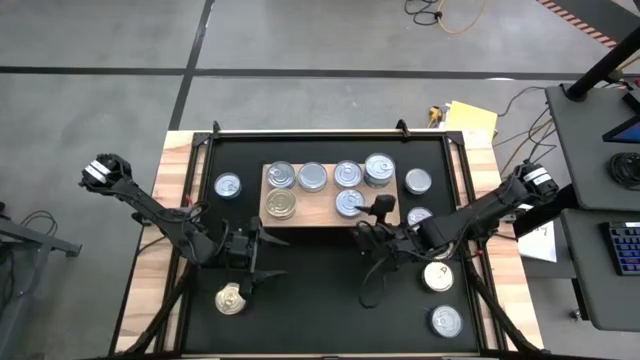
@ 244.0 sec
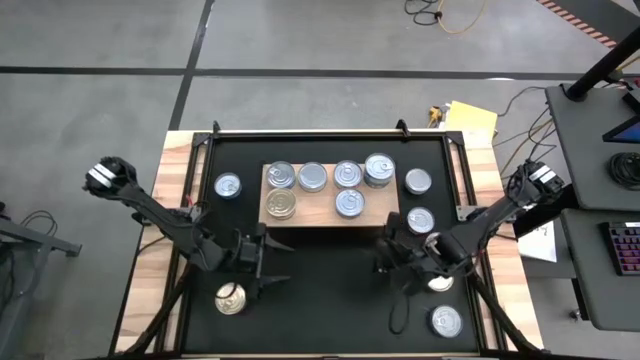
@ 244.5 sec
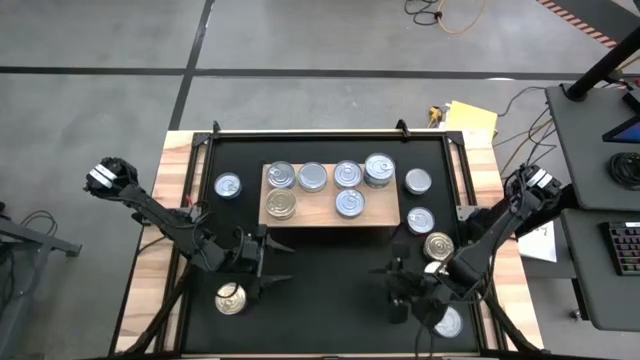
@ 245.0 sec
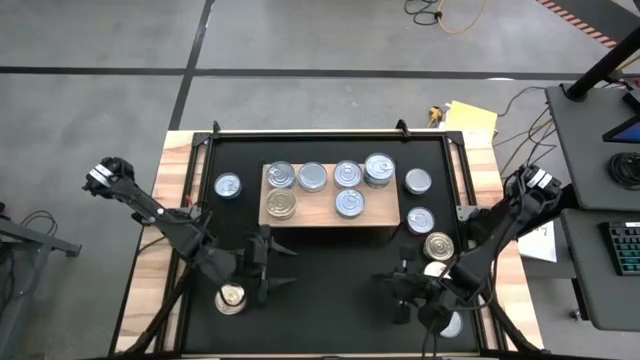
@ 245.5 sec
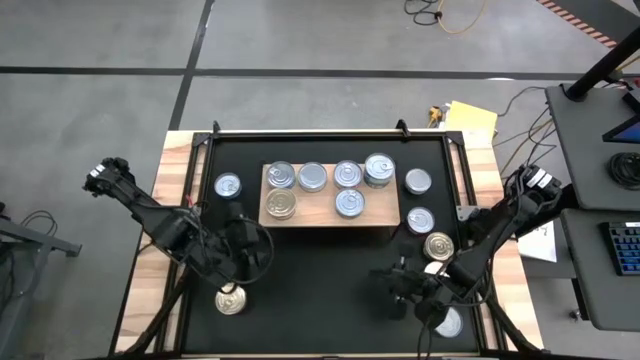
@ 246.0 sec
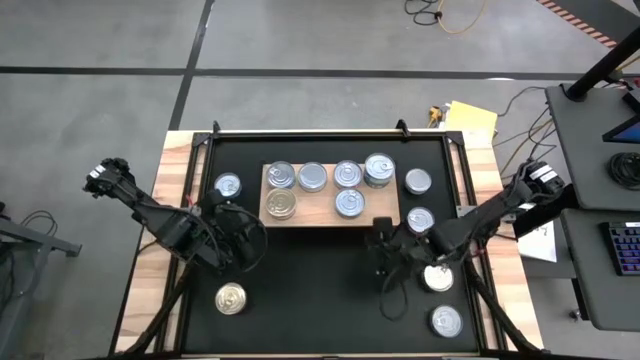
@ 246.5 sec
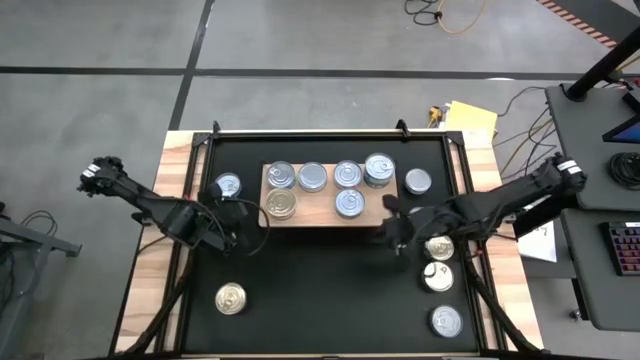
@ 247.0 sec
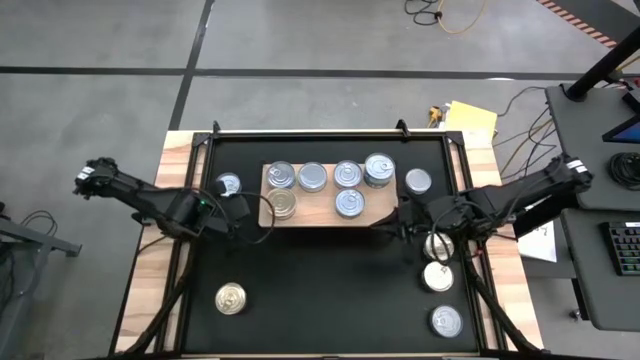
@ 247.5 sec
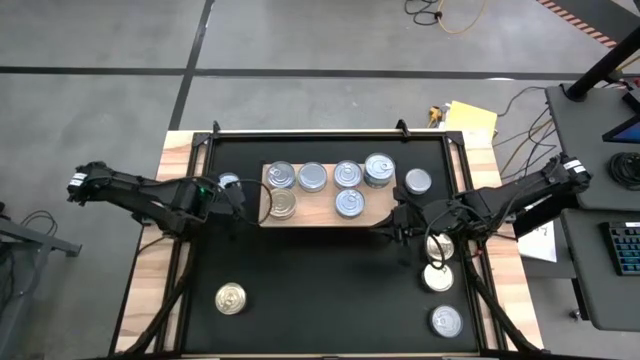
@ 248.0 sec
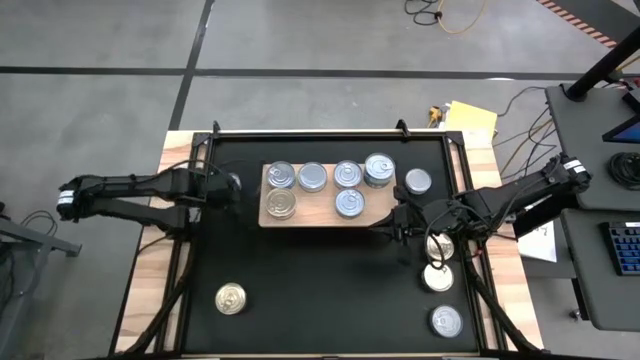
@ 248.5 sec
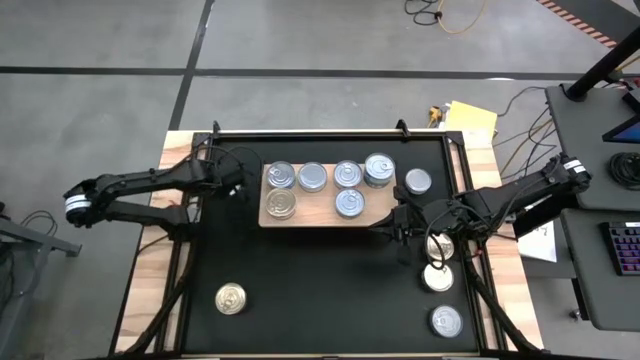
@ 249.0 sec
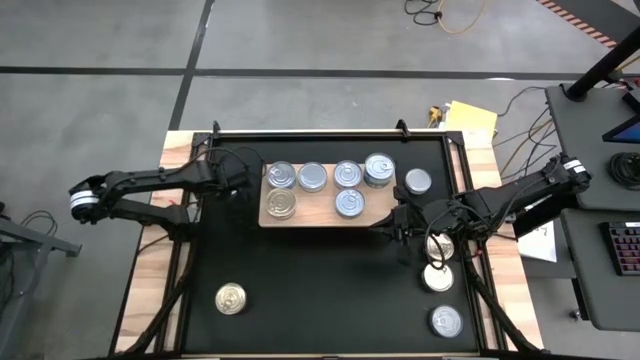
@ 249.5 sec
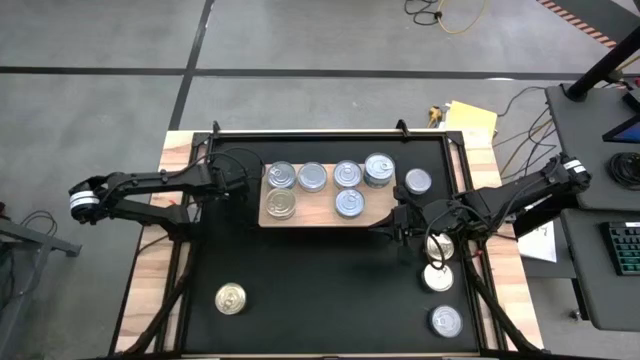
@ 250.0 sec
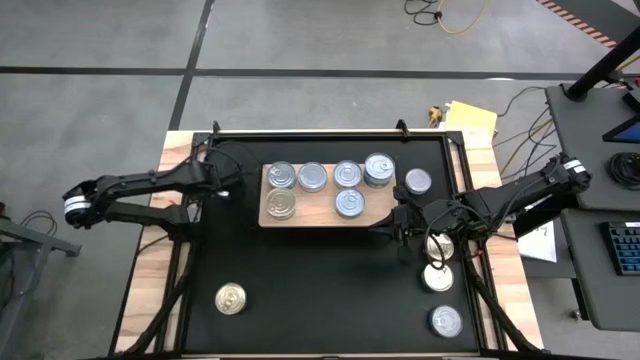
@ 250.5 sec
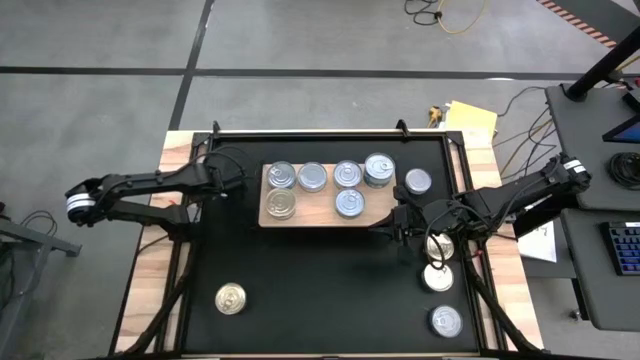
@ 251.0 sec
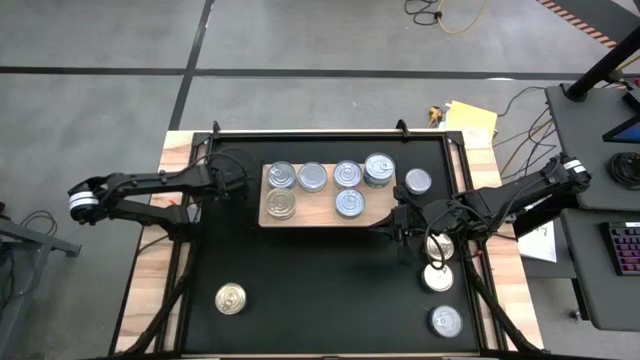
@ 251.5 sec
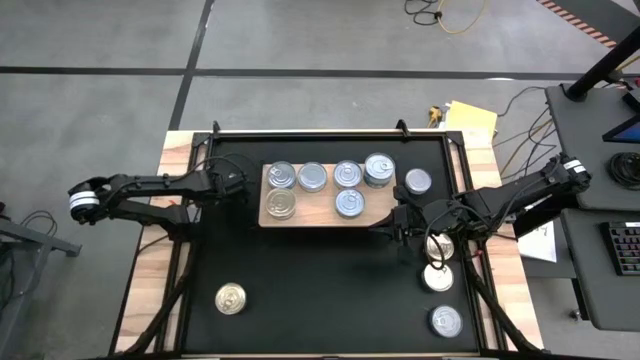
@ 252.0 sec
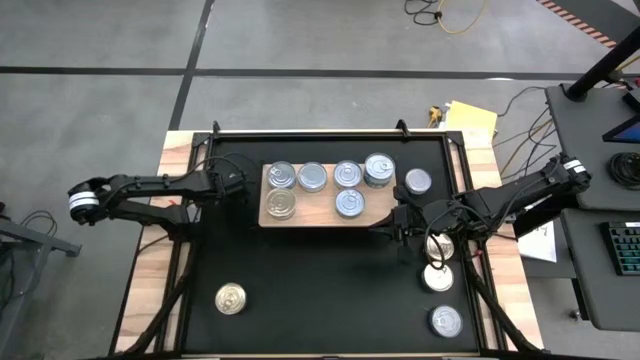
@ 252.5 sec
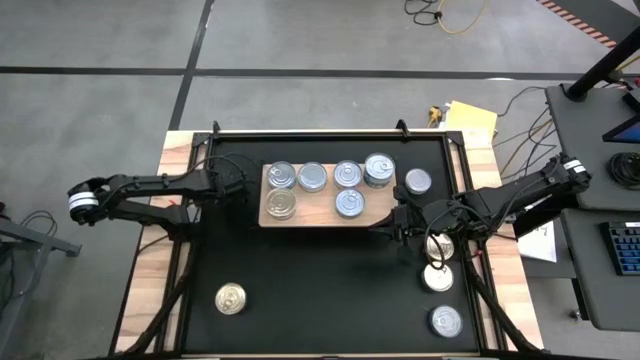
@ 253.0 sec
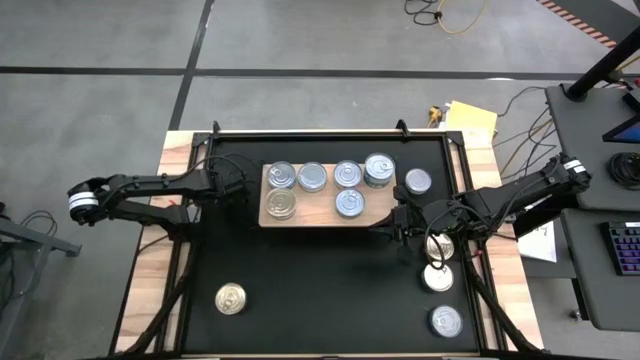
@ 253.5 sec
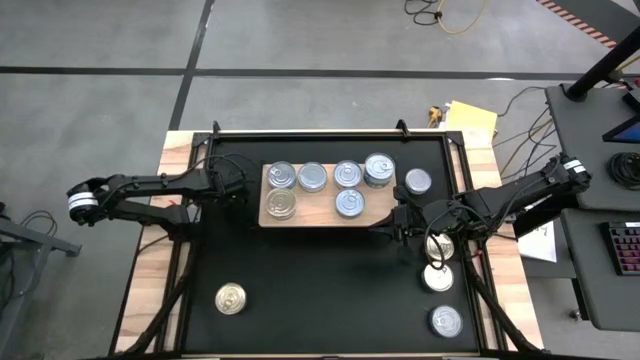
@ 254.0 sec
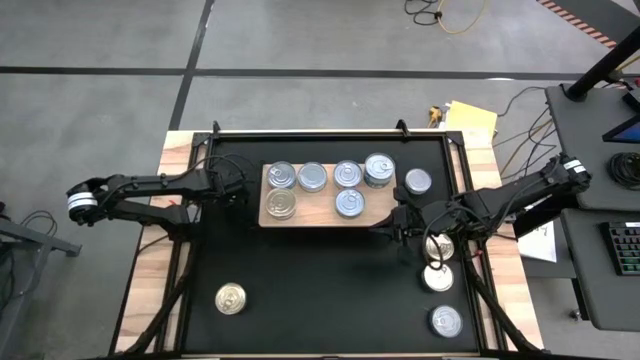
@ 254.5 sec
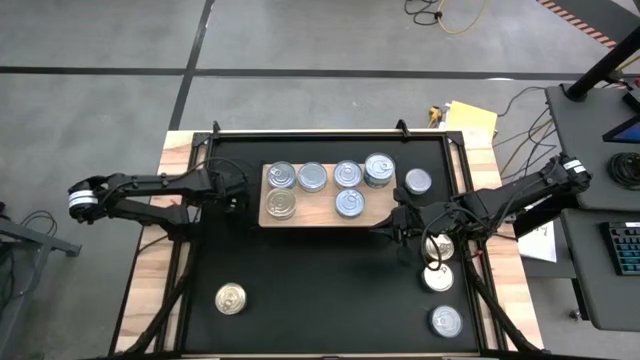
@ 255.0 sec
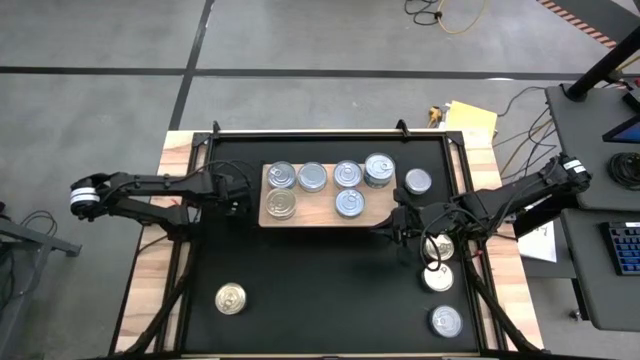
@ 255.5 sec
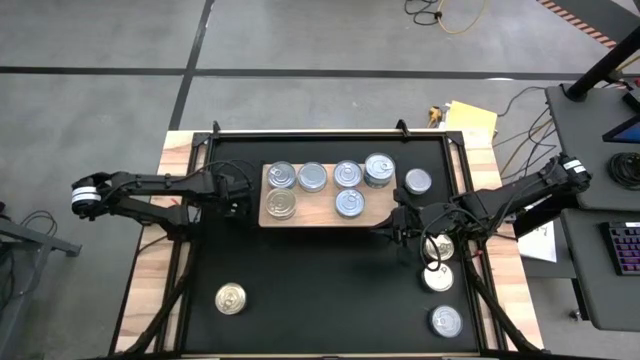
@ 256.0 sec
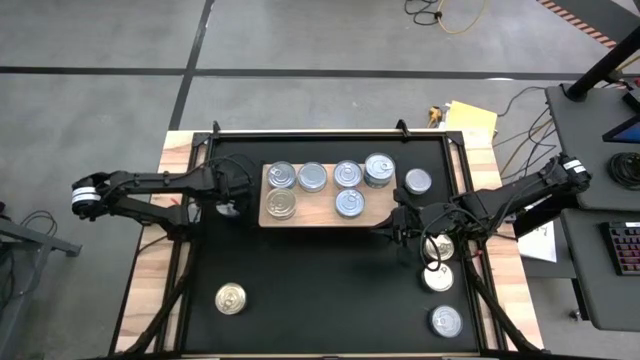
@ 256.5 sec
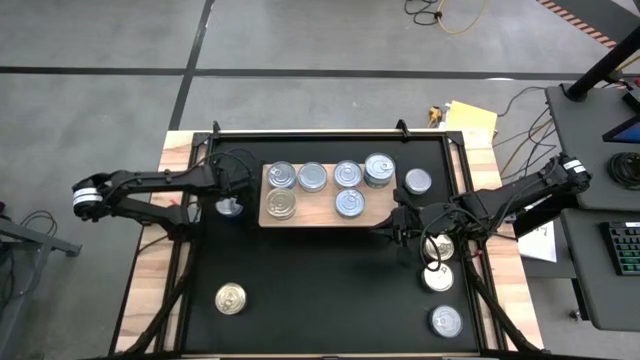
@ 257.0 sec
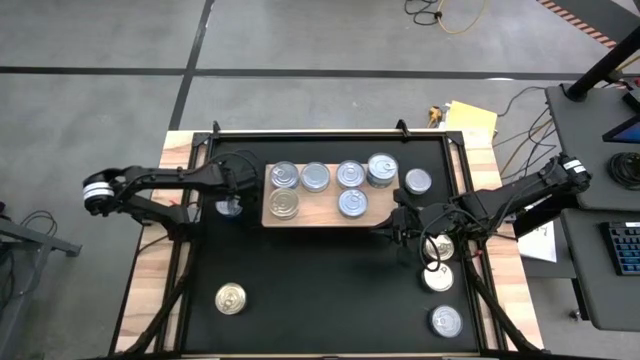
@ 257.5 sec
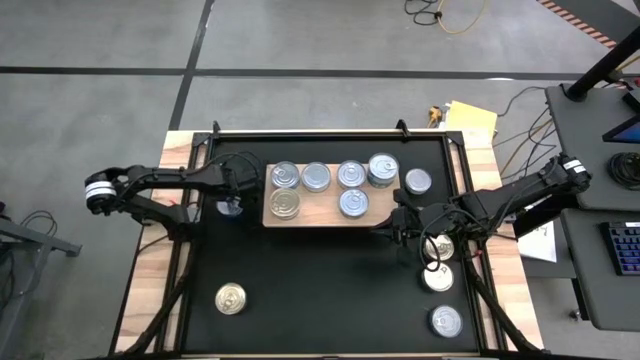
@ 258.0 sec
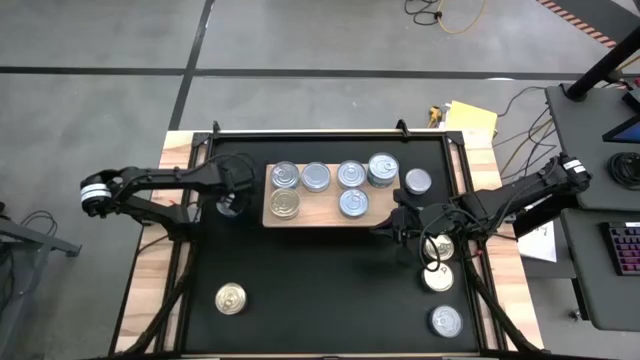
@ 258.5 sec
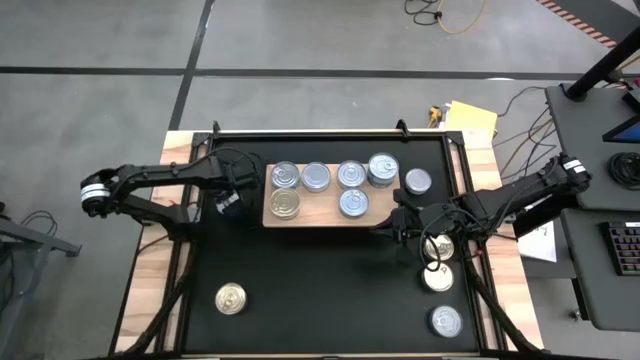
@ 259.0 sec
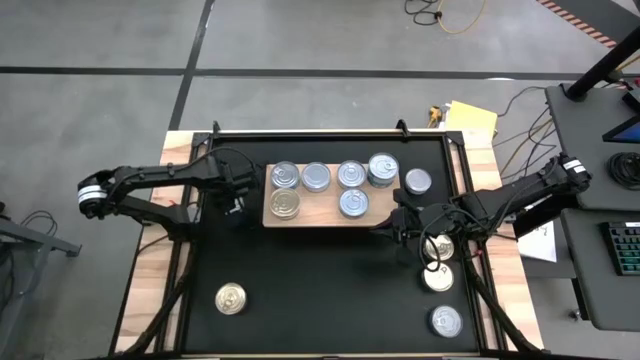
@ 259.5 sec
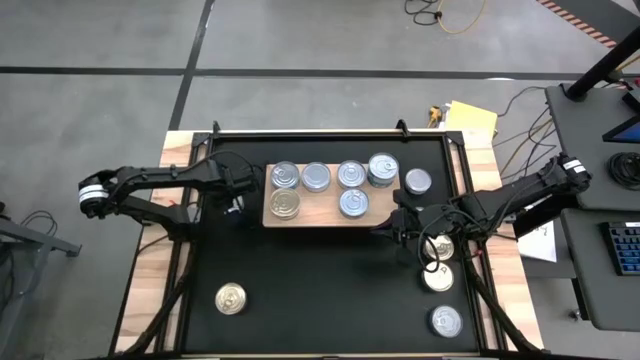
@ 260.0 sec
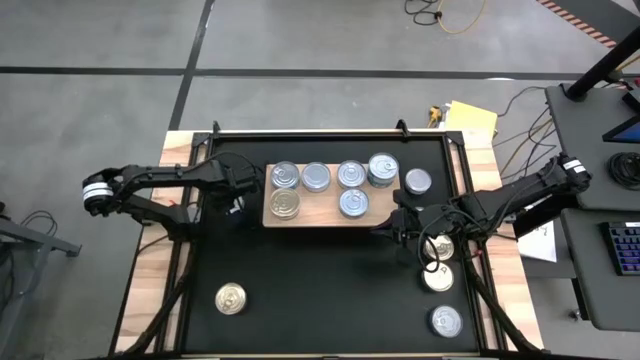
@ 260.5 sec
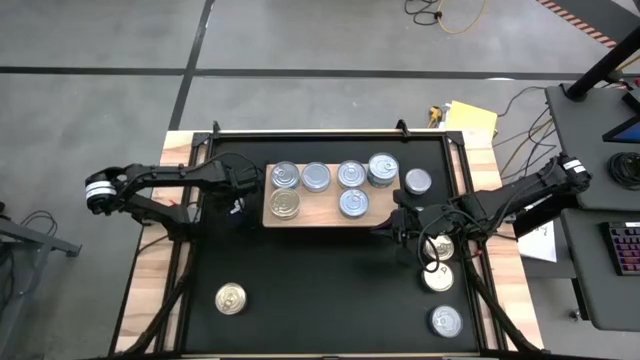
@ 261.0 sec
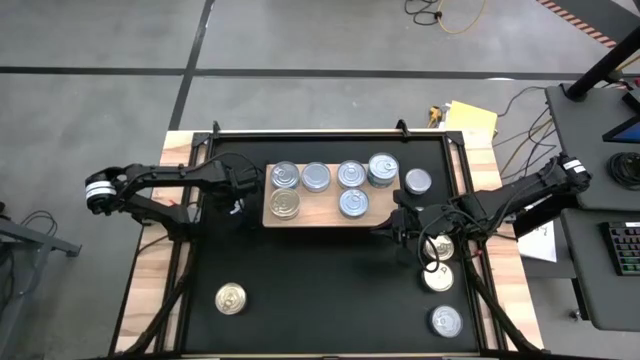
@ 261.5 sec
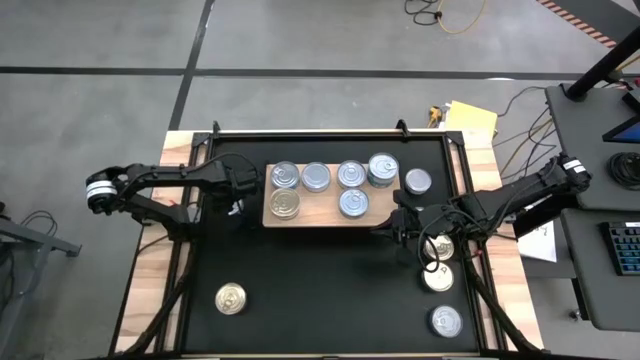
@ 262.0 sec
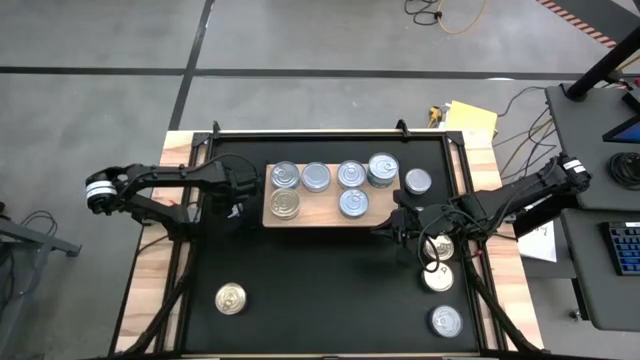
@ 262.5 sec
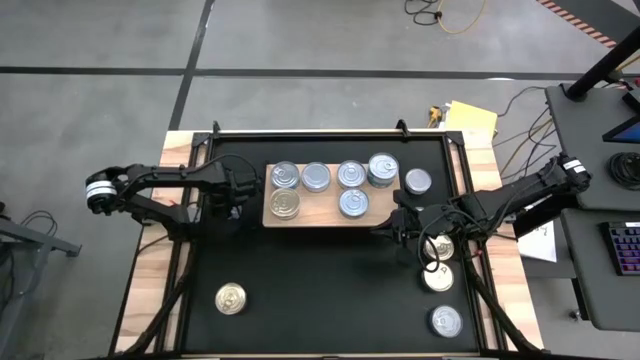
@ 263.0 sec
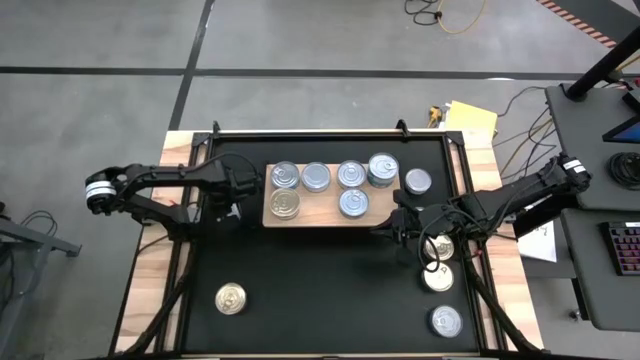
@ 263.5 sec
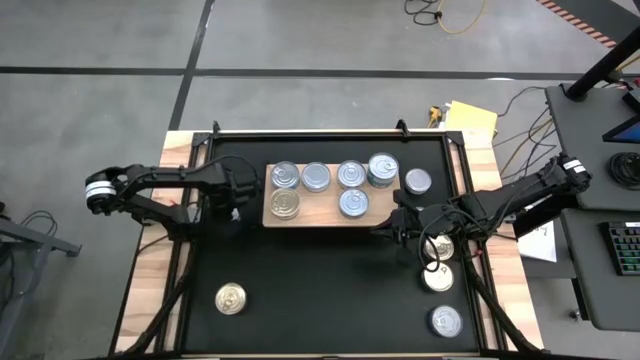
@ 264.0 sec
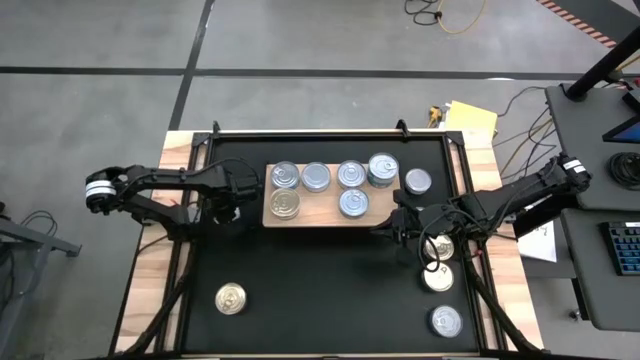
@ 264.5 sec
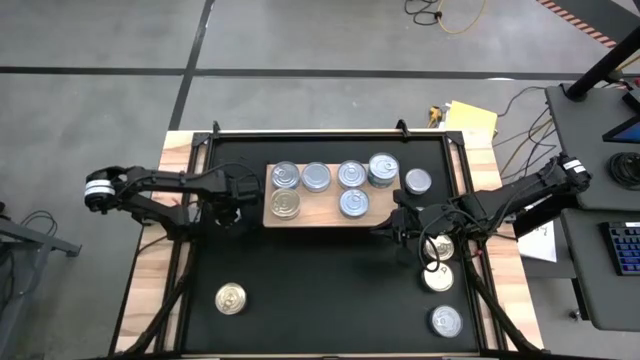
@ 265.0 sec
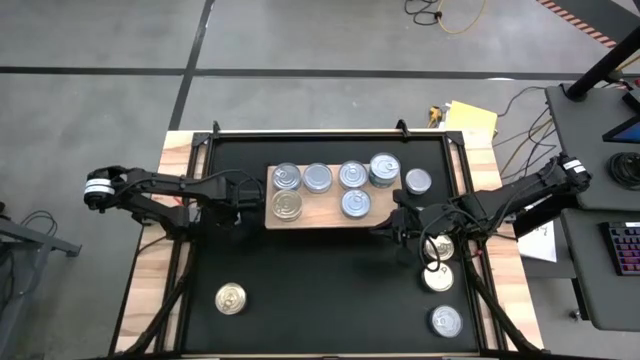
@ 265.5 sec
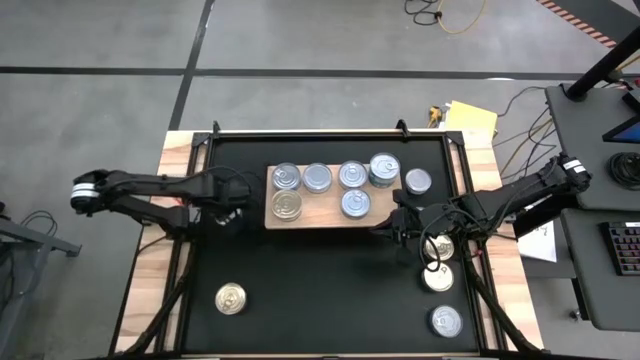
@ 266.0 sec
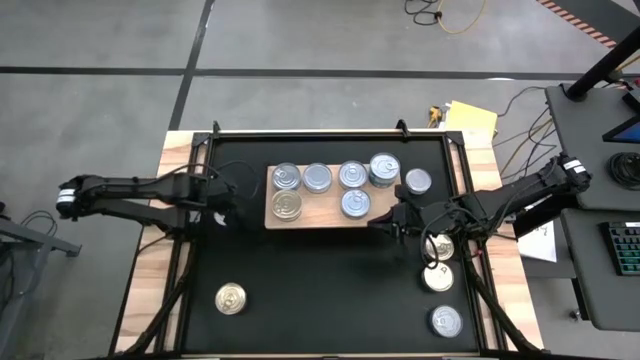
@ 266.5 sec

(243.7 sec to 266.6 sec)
Task: Stack canned seafood by type on shelf
Put the dark blue tuna can on the shelf
